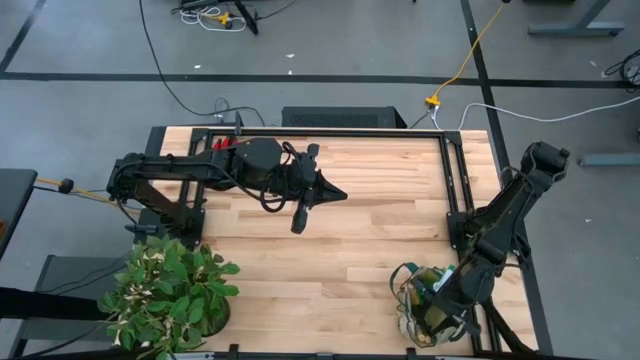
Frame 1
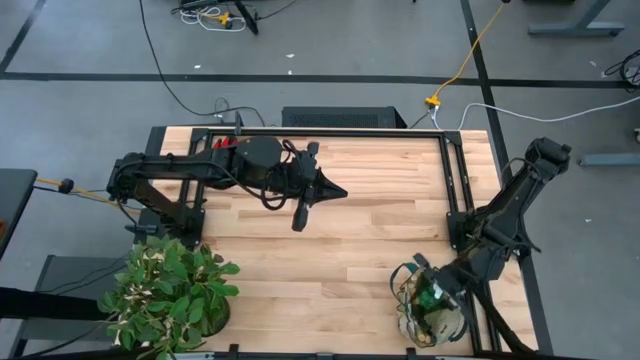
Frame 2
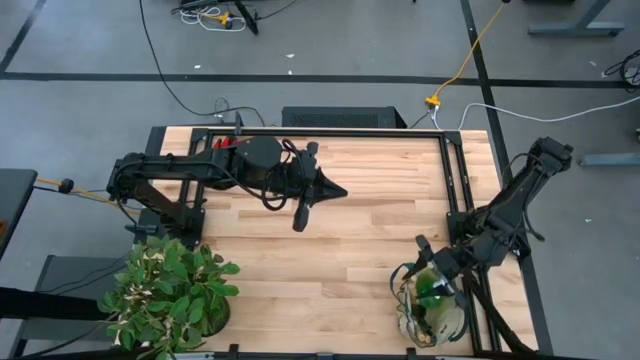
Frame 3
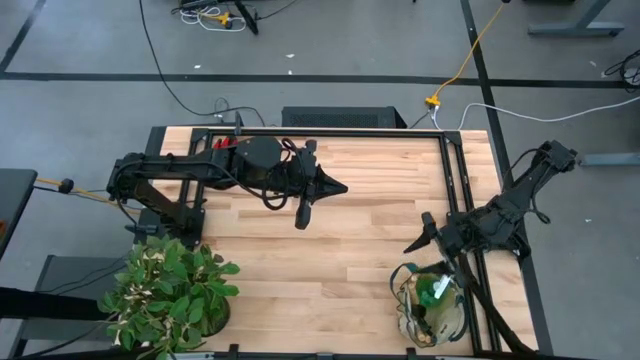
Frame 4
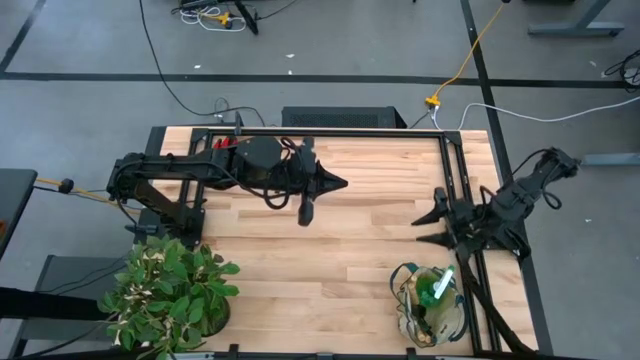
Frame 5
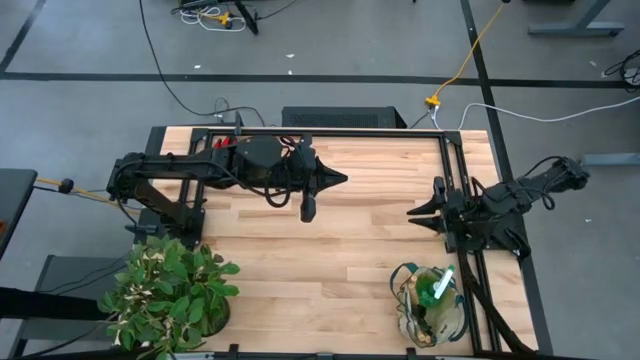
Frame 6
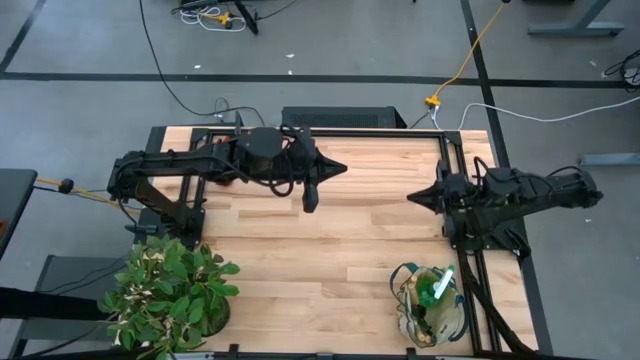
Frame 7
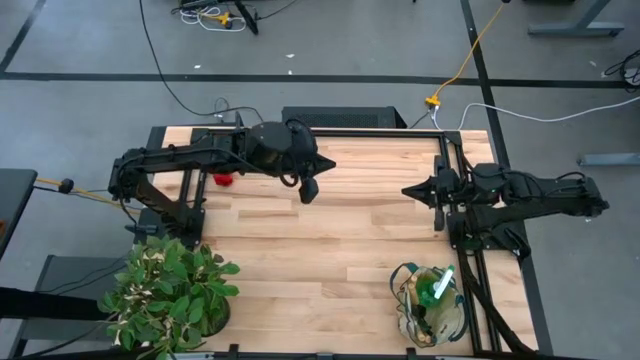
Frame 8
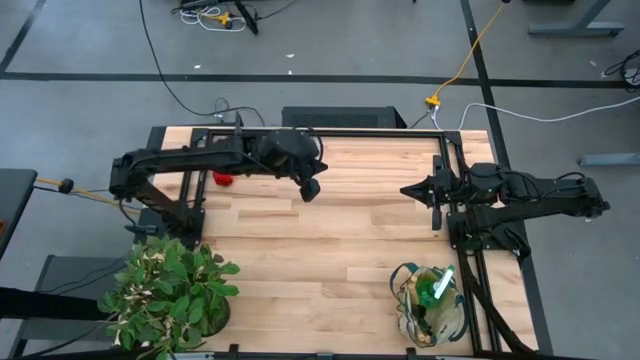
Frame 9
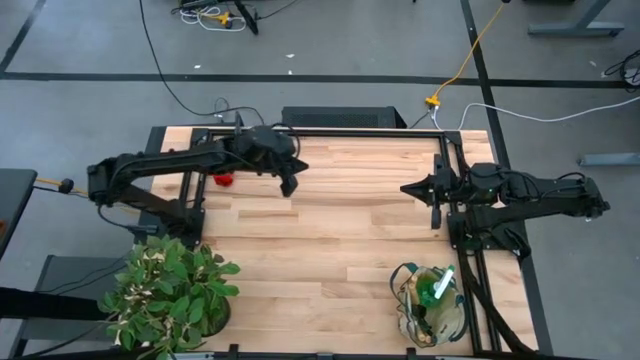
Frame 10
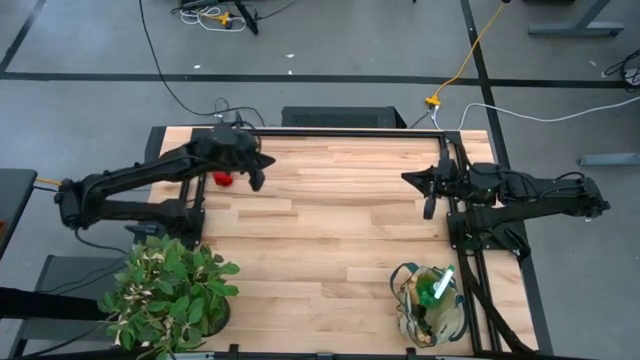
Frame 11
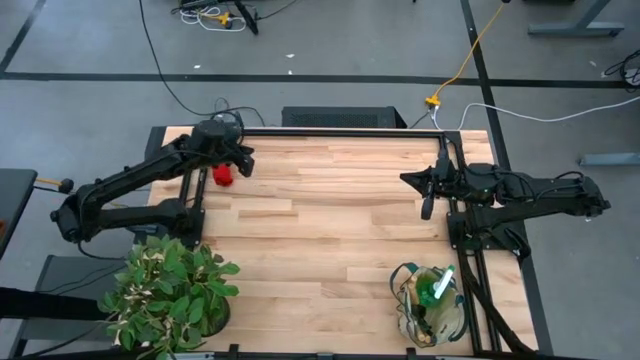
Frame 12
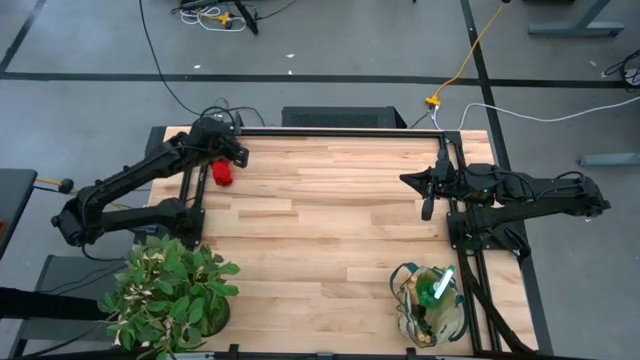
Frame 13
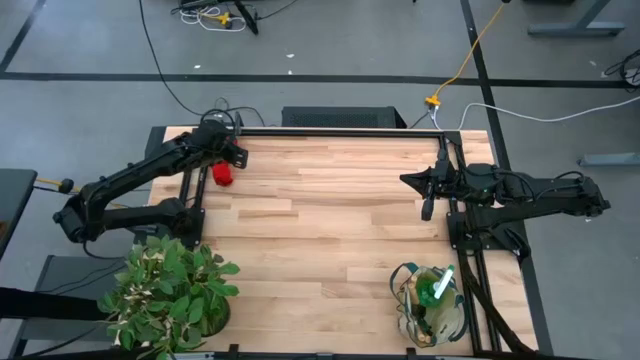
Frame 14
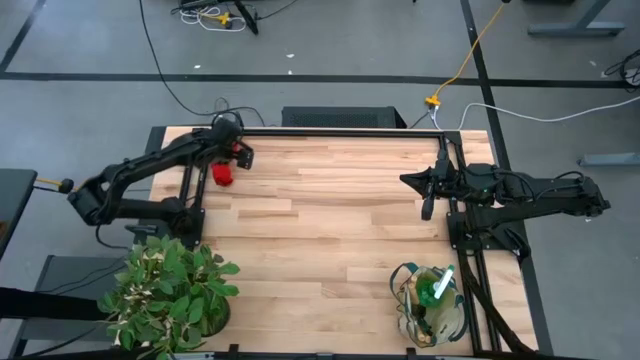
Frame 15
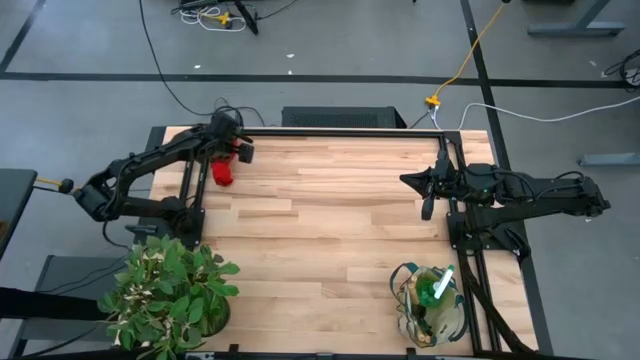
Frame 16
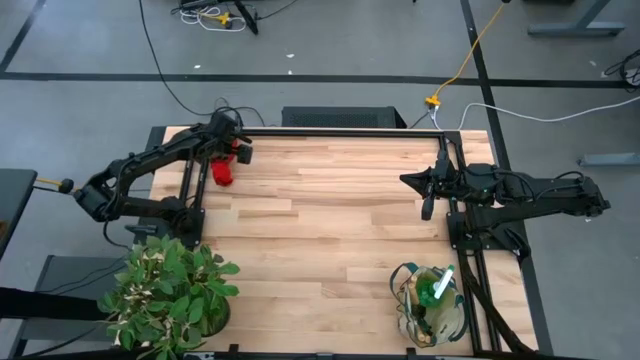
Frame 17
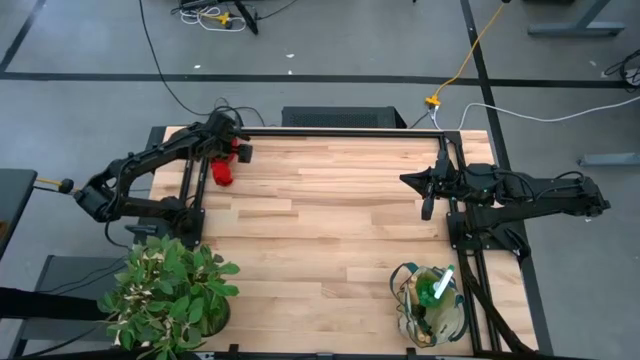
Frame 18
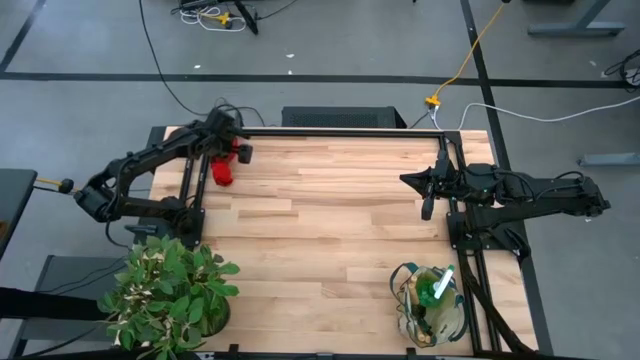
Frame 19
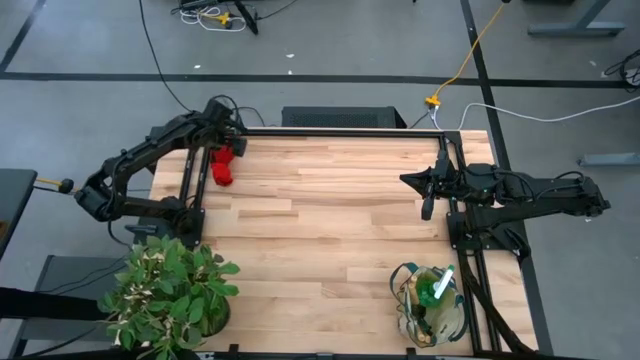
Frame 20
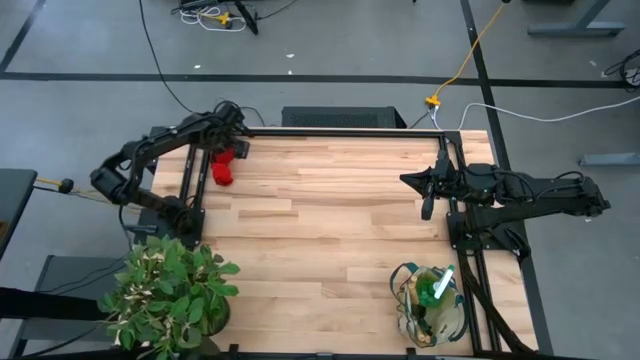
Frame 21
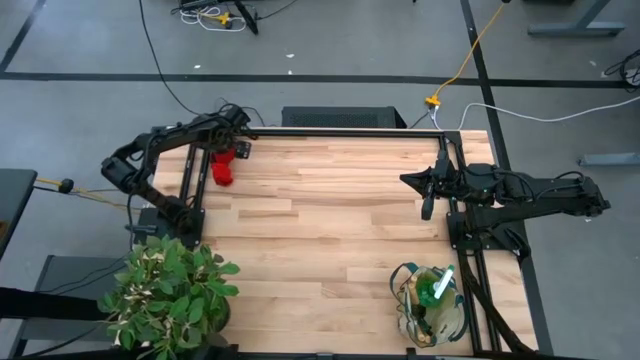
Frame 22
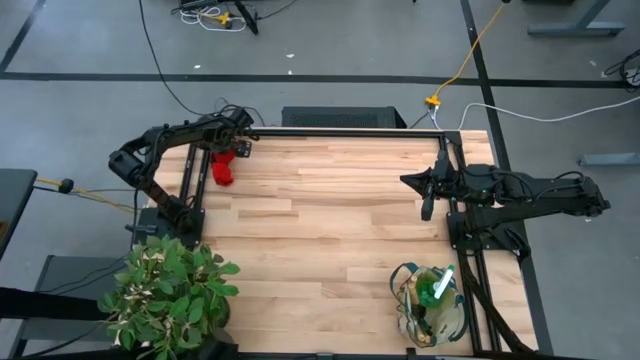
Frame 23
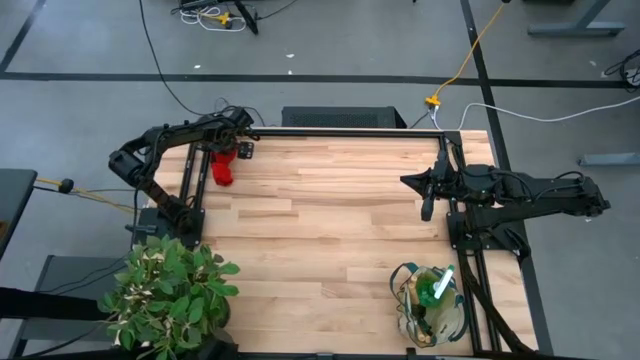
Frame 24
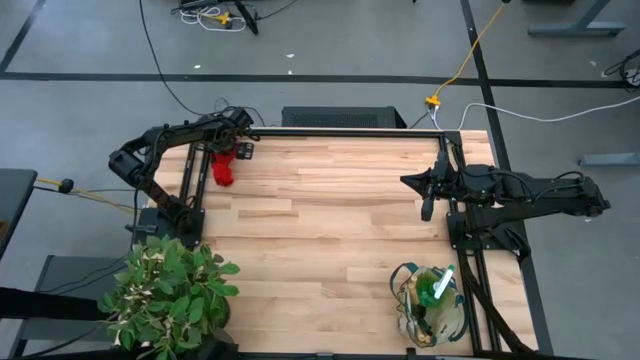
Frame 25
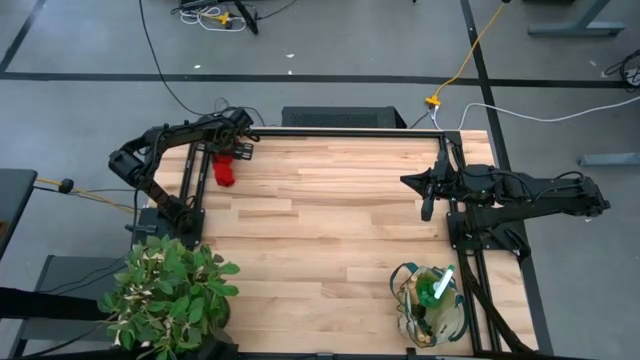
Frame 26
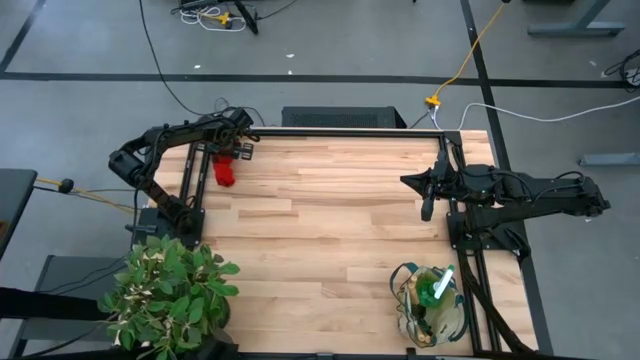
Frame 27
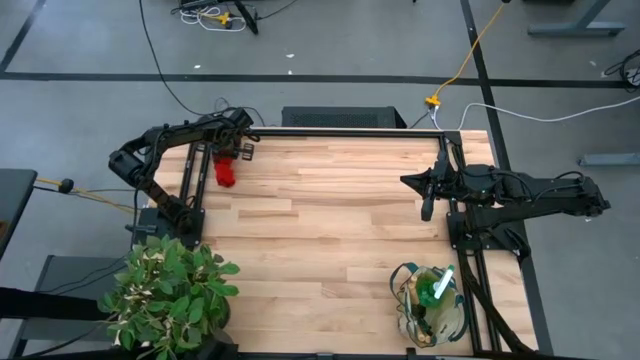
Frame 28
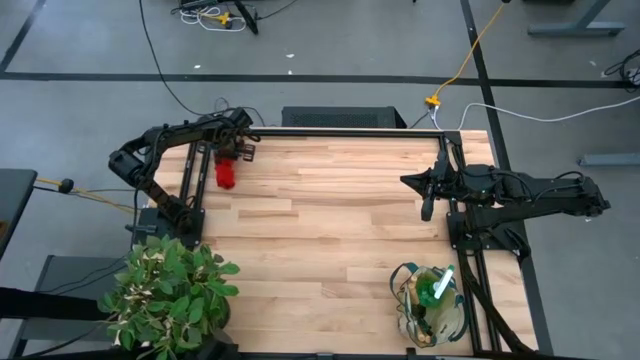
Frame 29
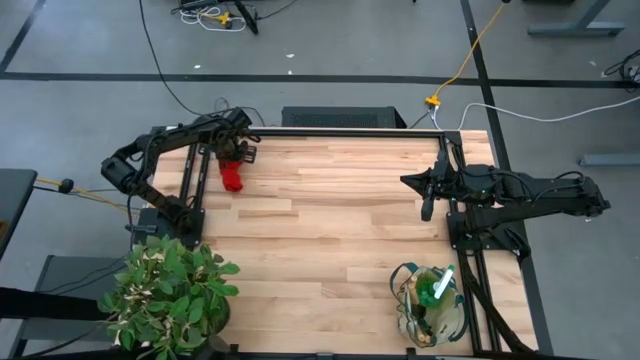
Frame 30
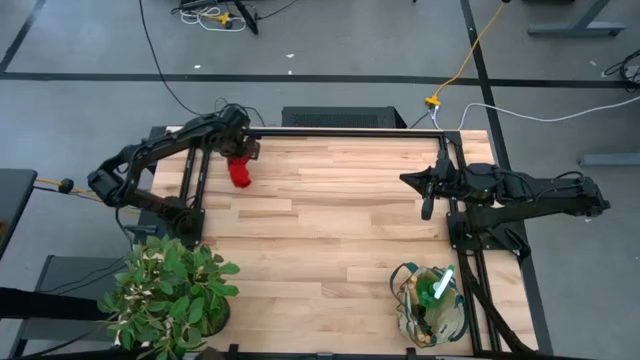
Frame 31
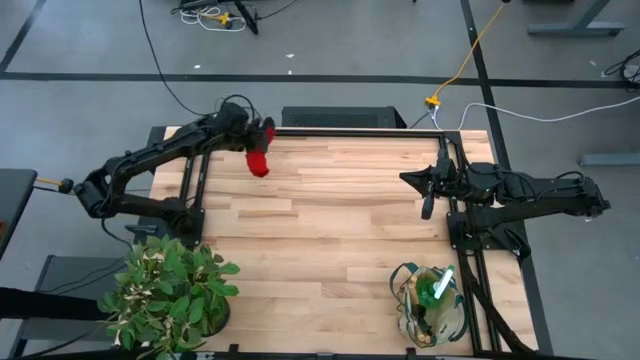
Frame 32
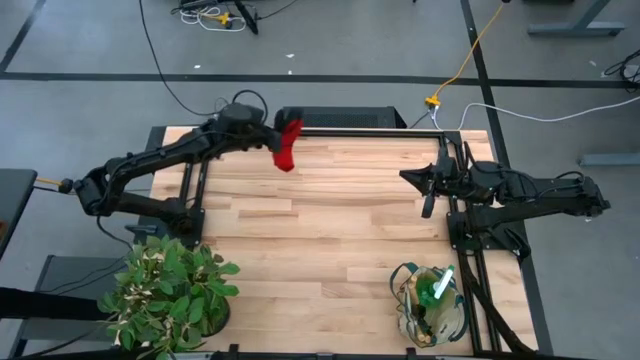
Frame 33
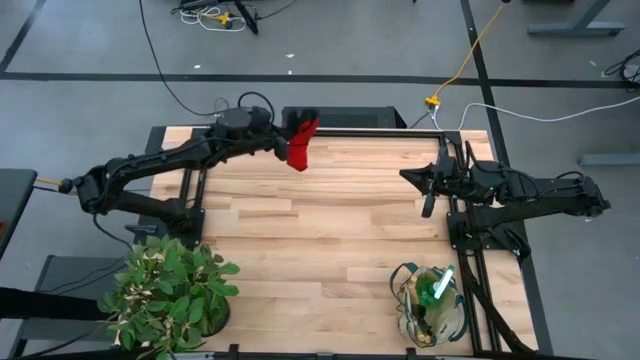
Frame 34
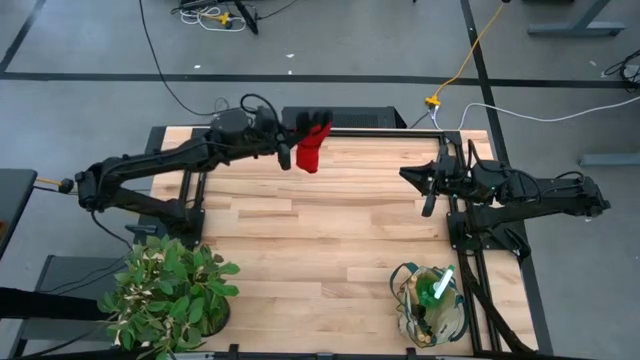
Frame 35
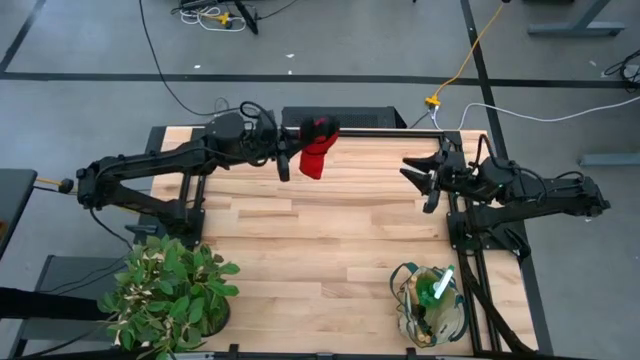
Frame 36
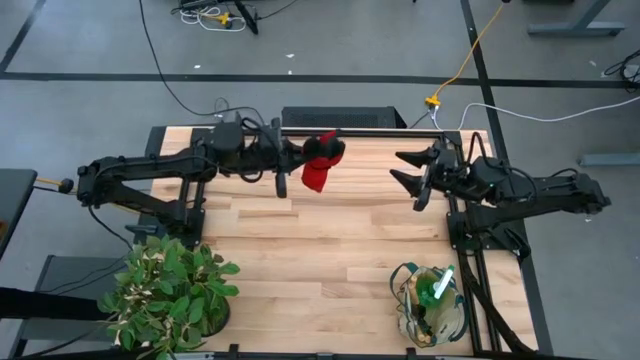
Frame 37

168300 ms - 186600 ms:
Task: Pick & Place Garden tools in Gardening bag
Put the red gloves into the white gardening bag

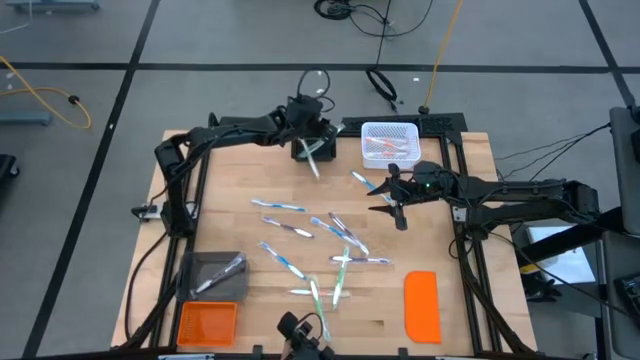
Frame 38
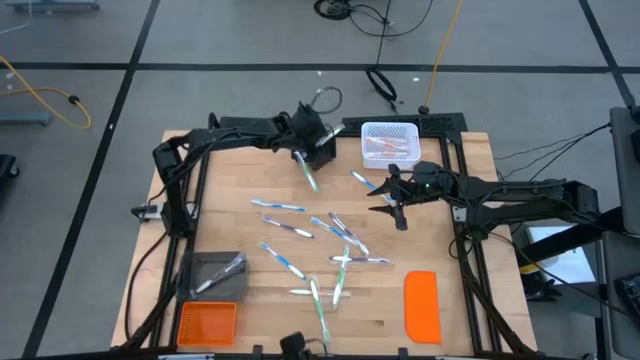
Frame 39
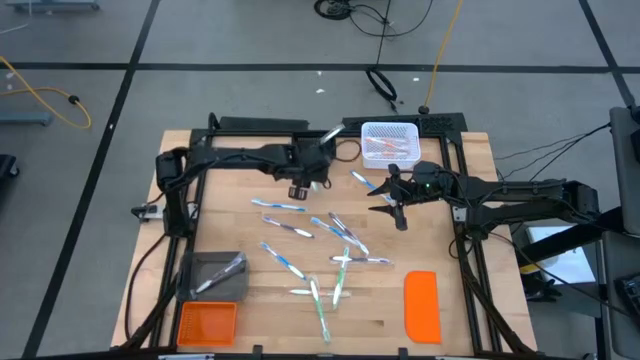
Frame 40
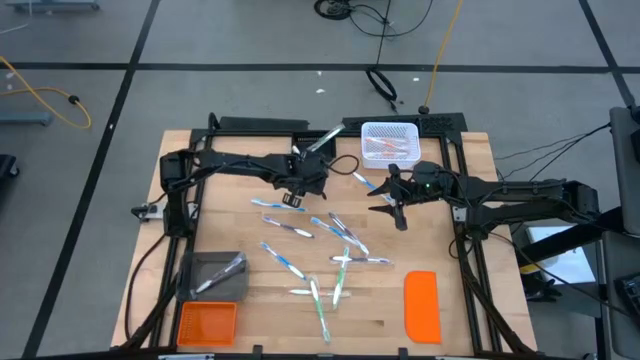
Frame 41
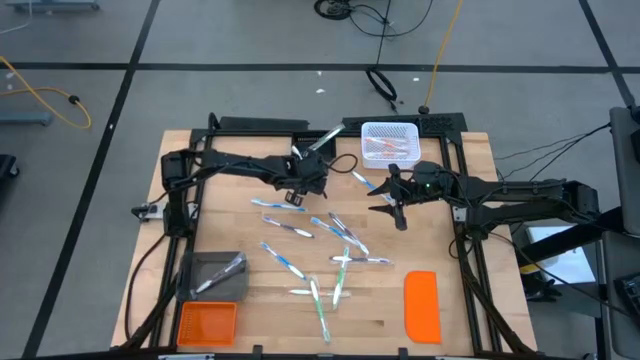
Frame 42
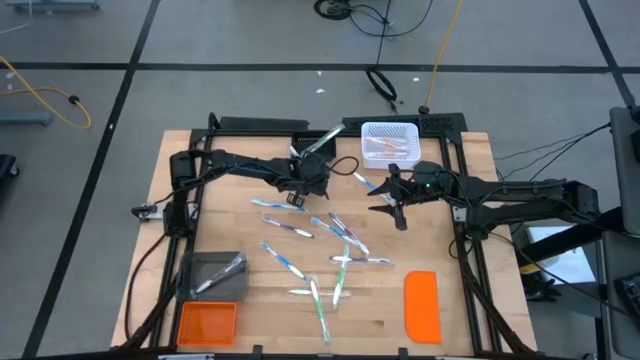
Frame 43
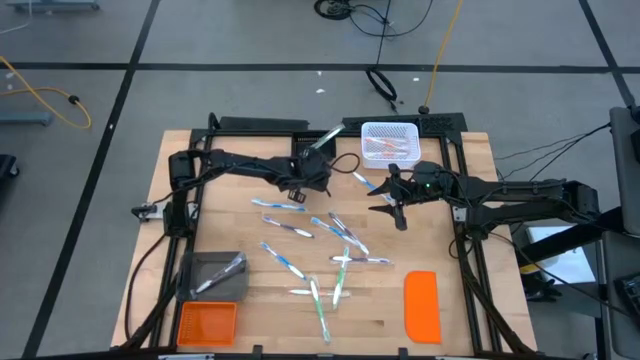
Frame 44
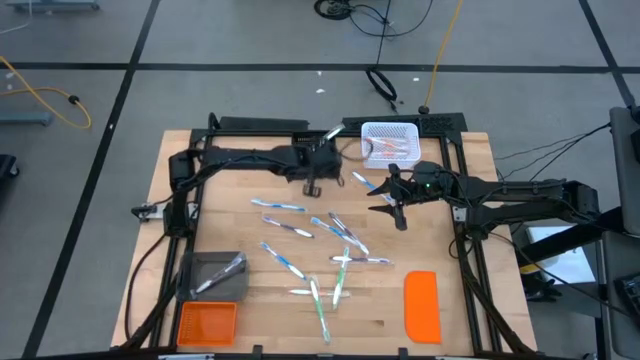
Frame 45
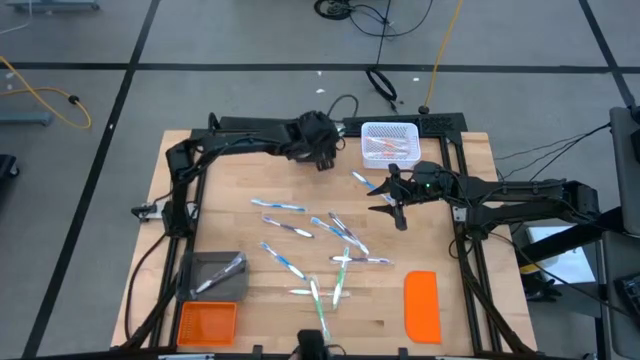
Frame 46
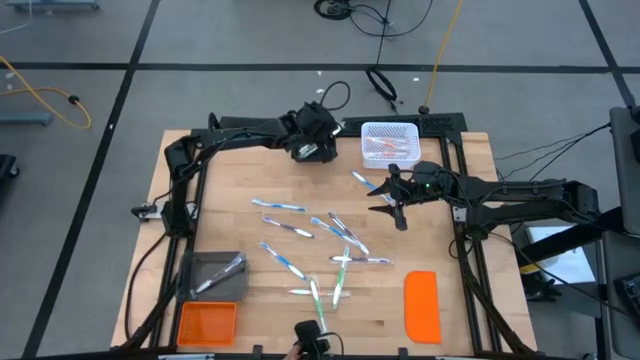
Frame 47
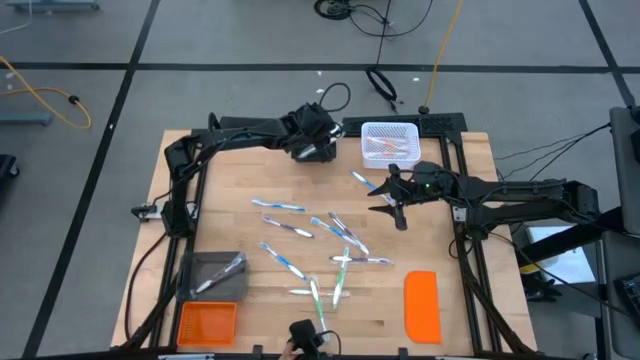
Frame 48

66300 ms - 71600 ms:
Task: Pick & Place Toothbrushes
Put the green toothbrush into the black bin
